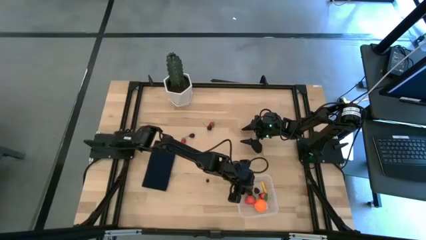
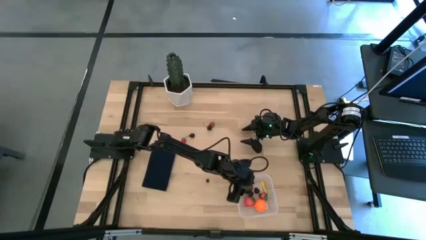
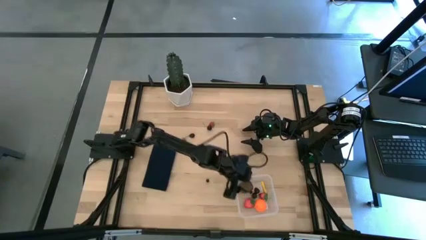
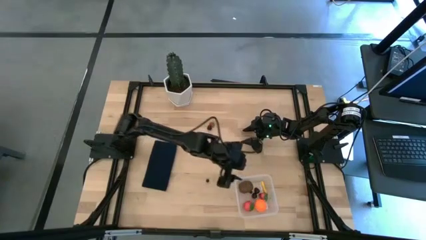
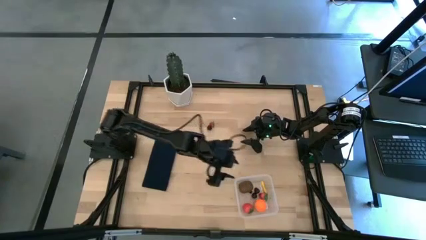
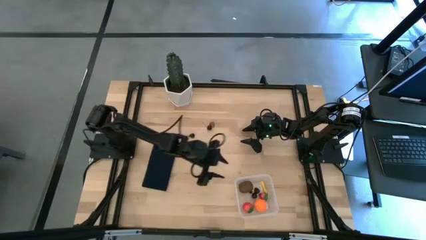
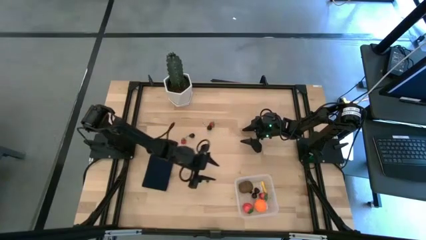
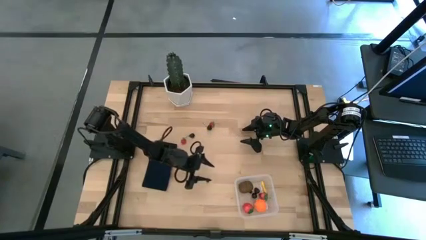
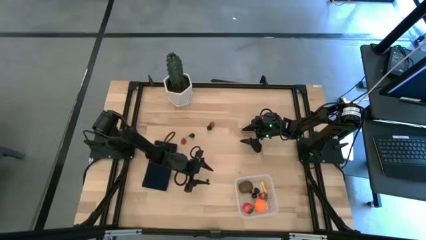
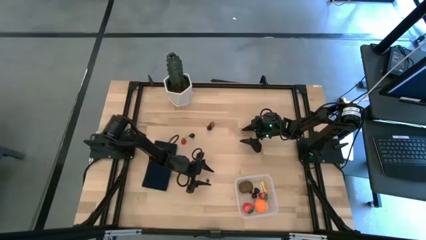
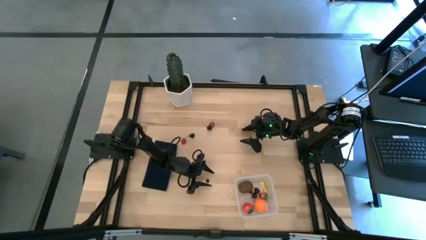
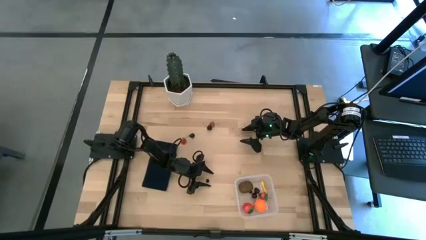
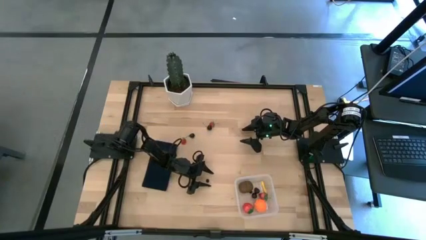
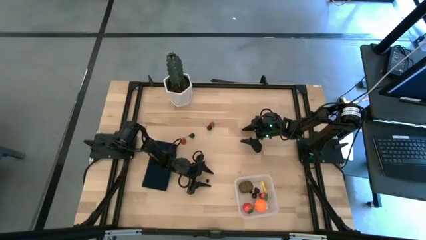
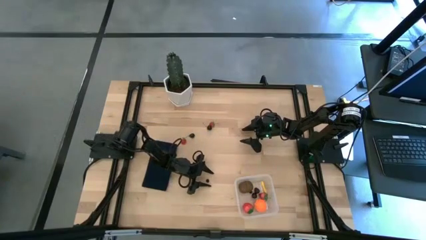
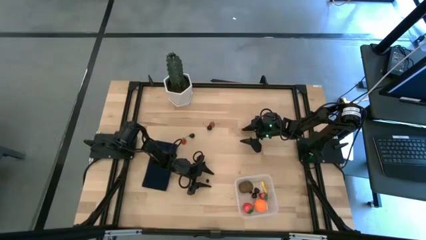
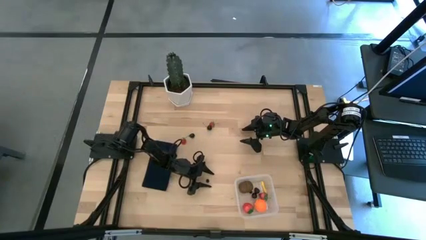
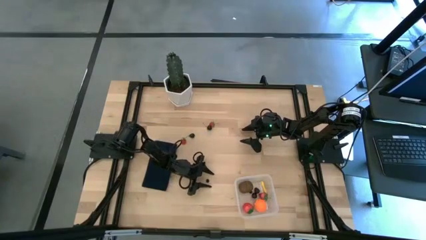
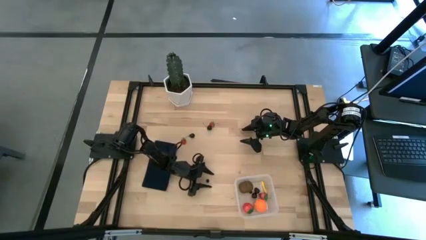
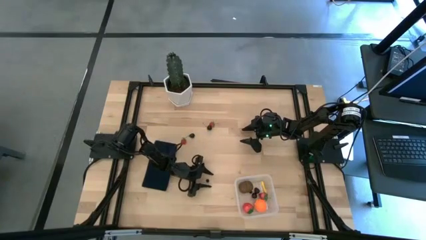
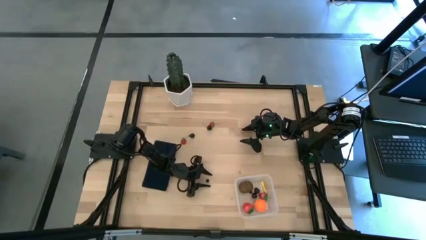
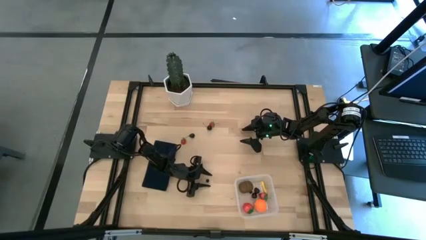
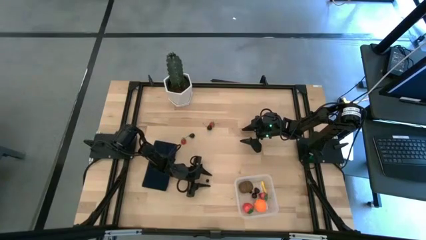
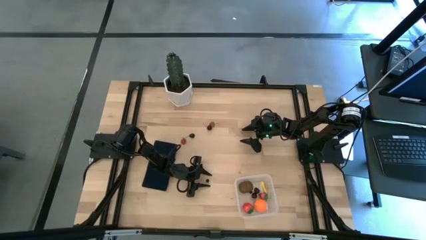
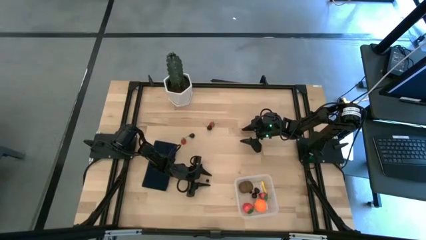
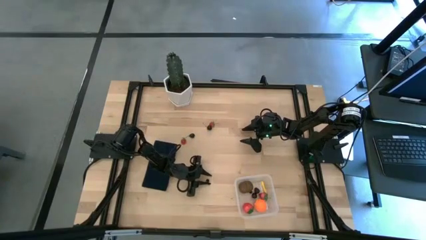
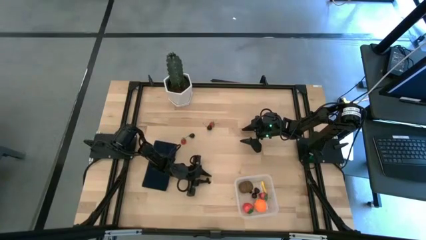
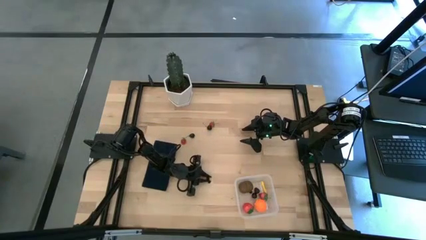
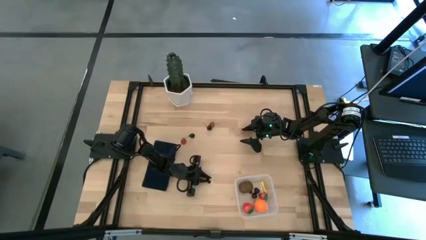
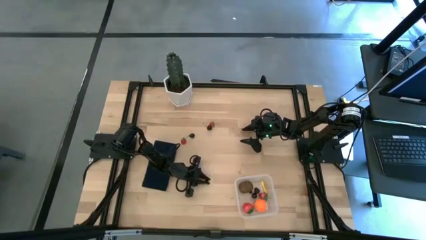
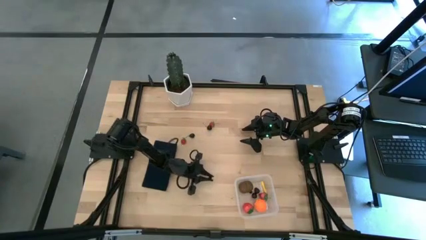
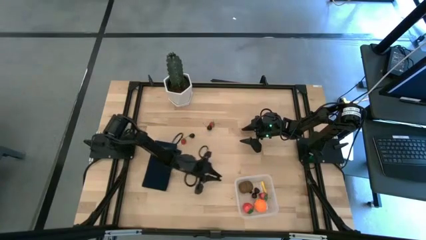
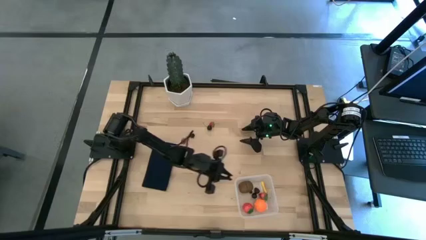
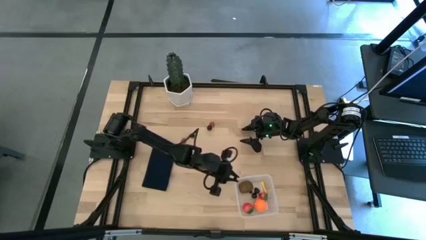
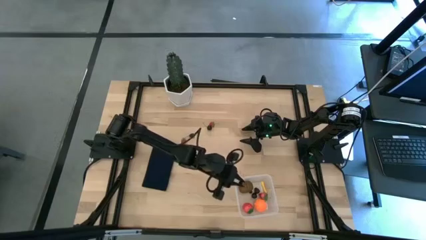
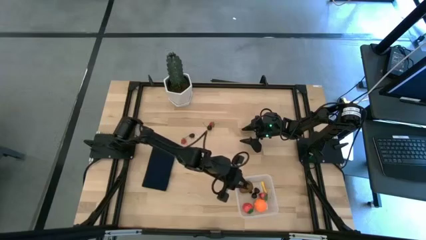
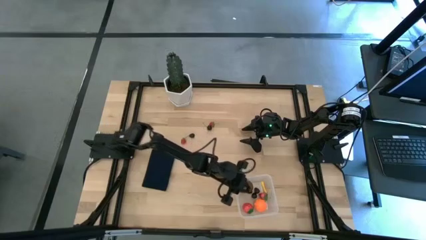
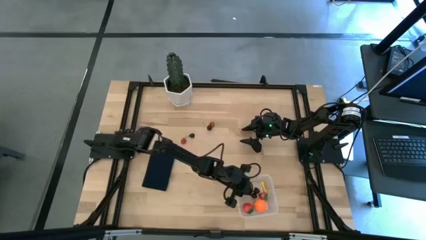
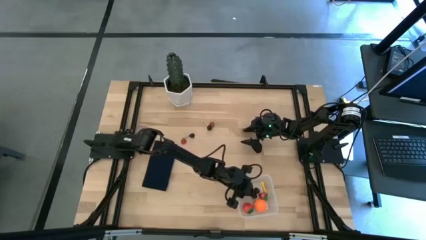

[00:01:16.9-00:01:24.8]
Task: Pick and placing Produce into tupperware
Put the blueberry into the transparent bin

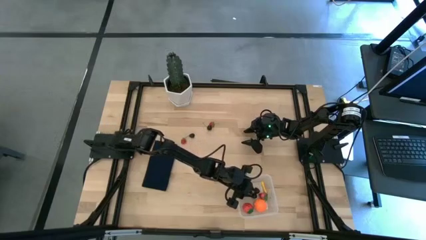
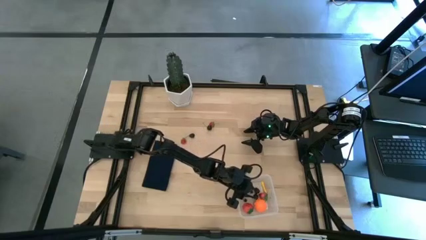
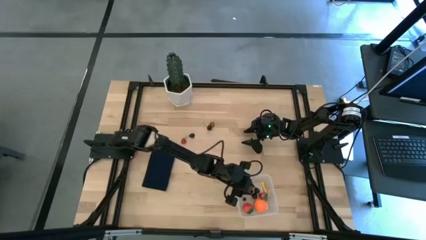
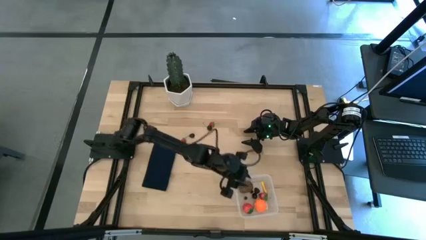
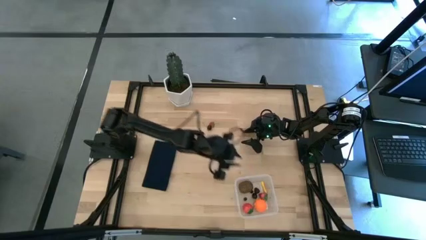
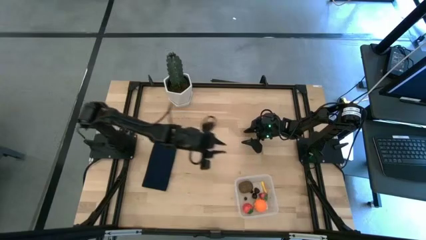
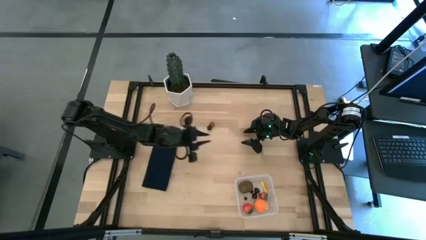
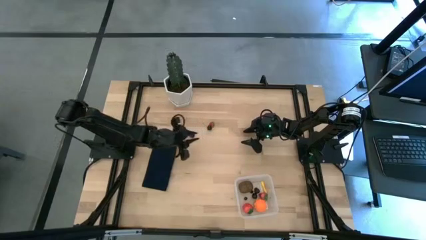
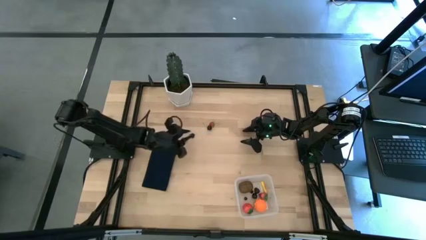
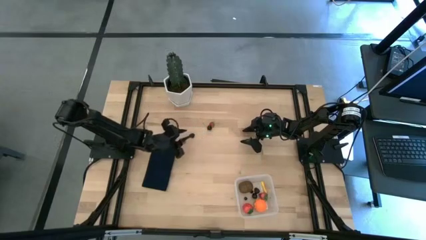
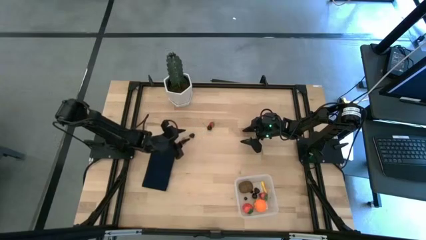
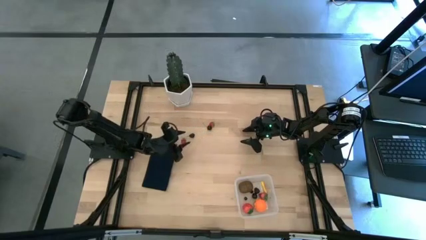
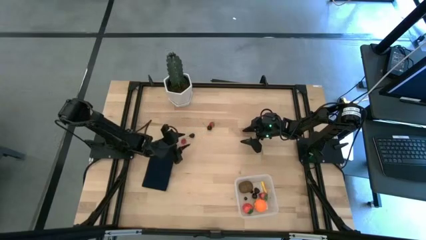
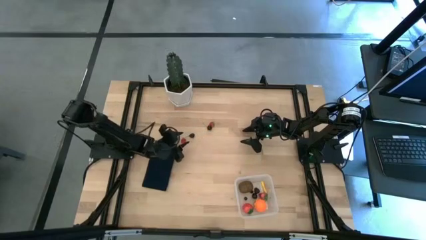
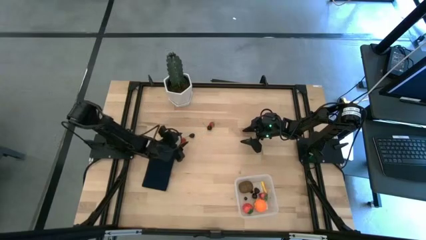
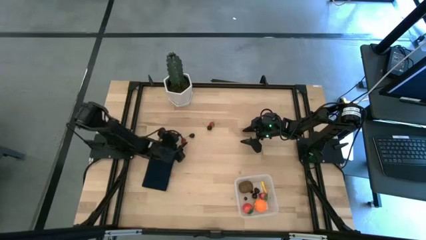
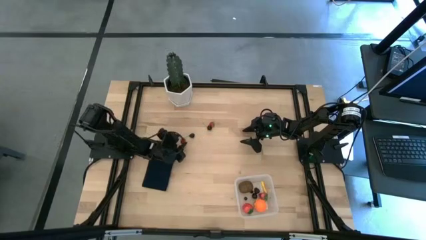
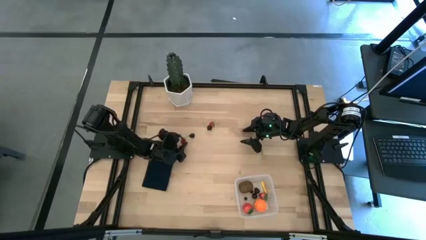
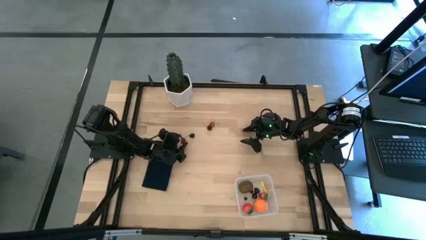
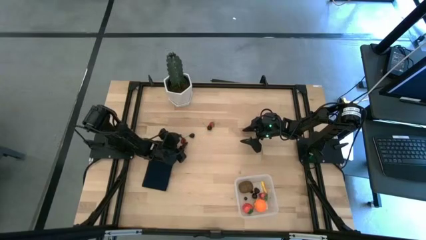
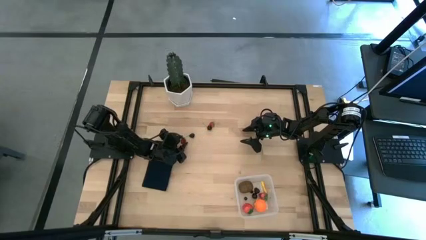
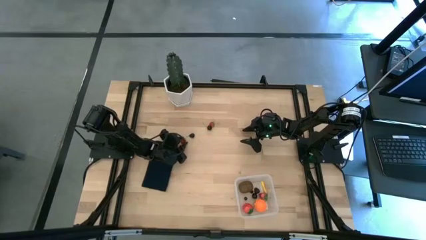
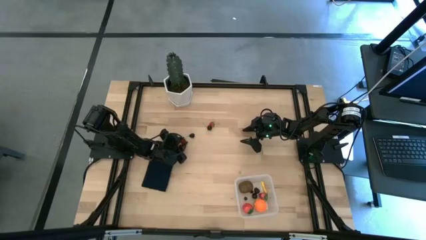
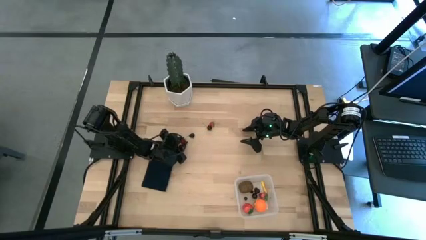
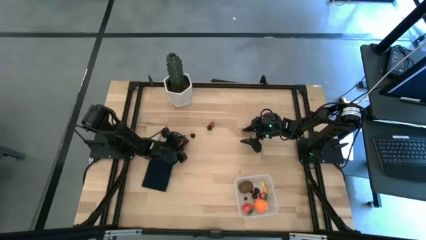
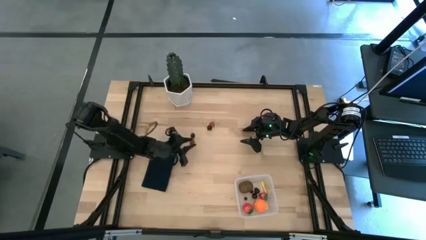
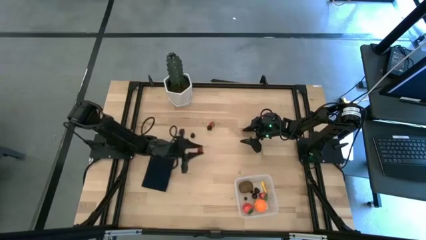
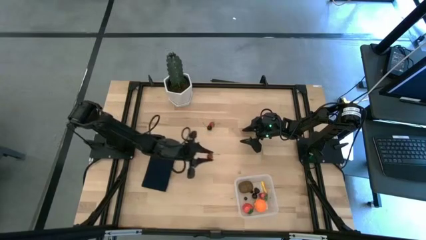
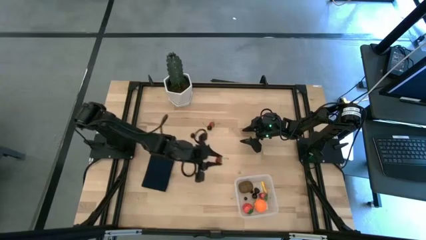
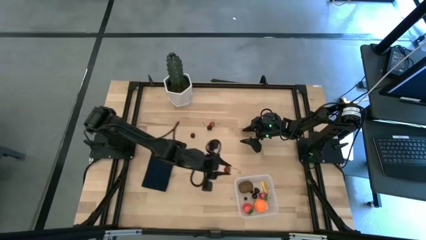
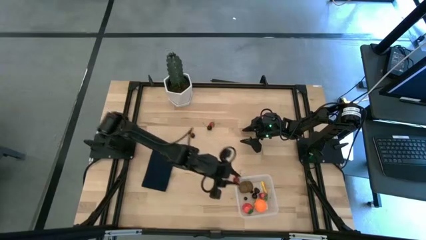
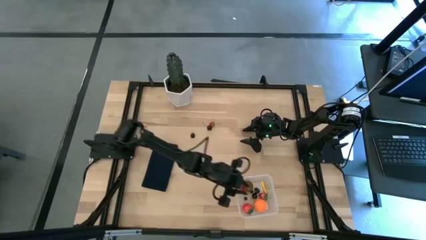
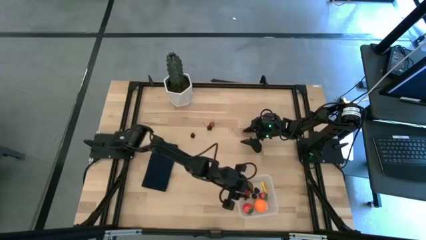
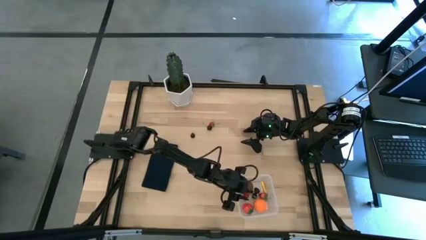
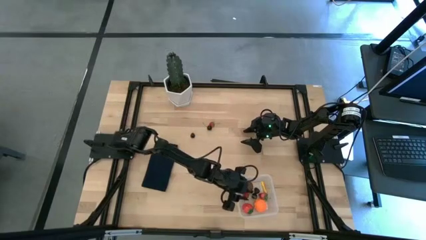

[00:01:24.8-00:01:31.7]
Put the left strawberry into the transparent bin
